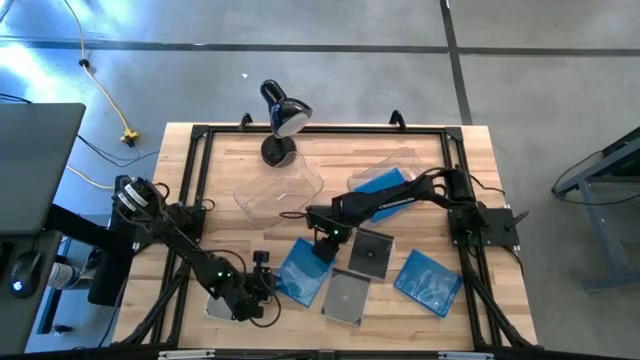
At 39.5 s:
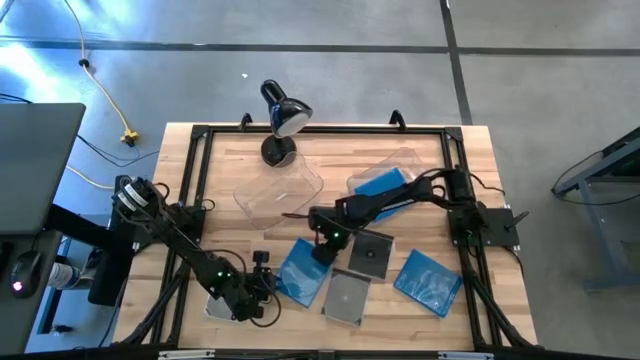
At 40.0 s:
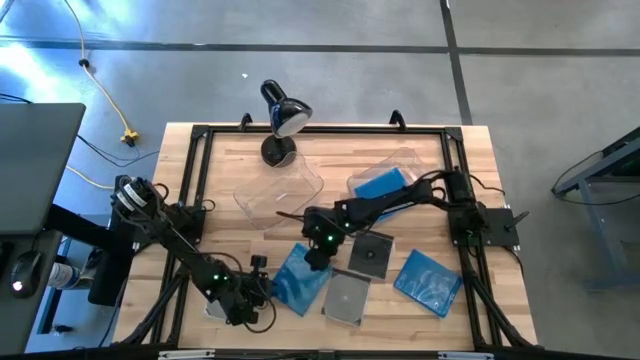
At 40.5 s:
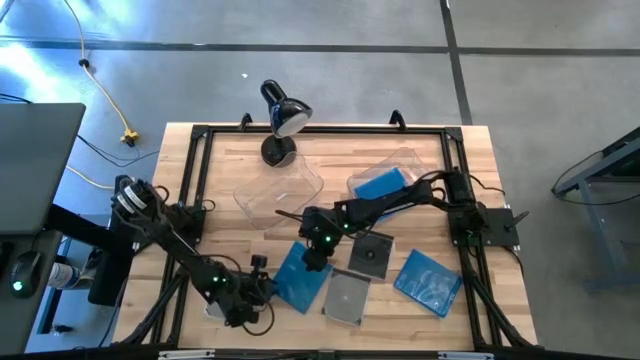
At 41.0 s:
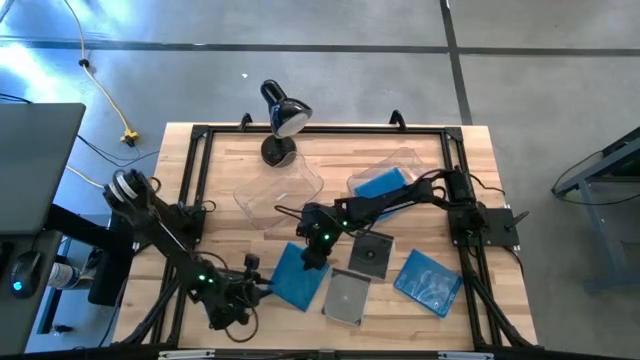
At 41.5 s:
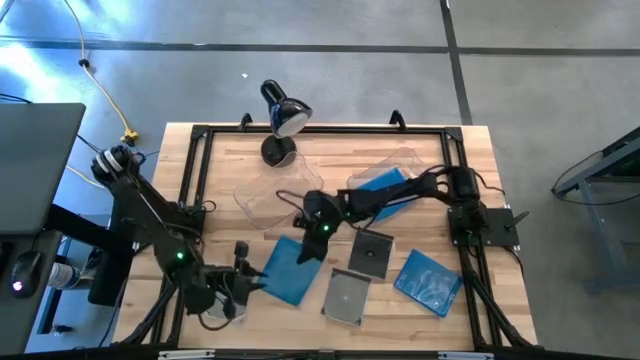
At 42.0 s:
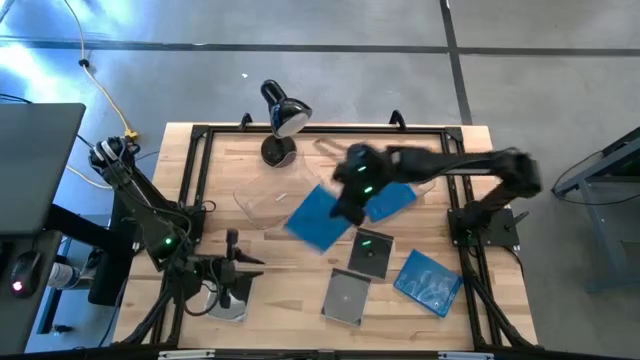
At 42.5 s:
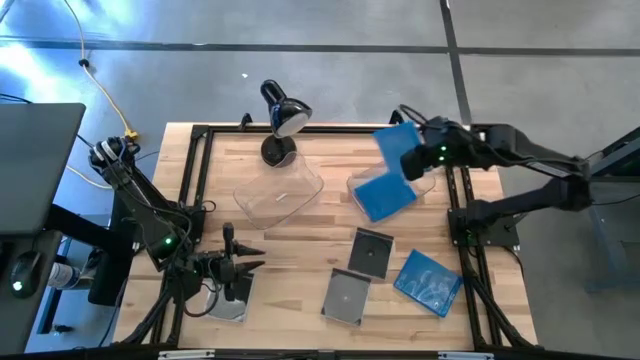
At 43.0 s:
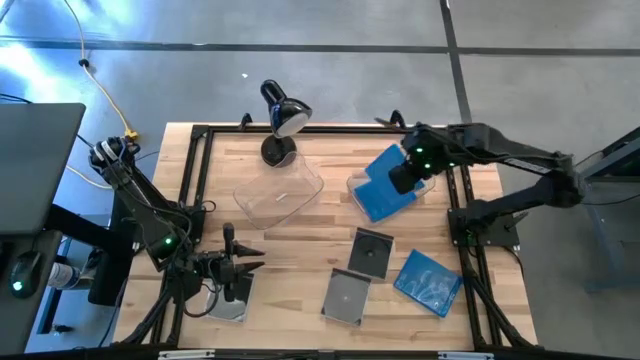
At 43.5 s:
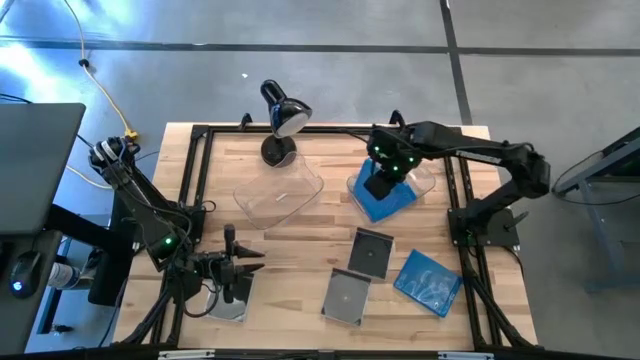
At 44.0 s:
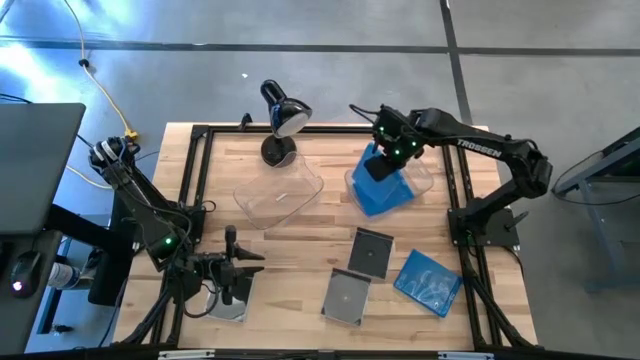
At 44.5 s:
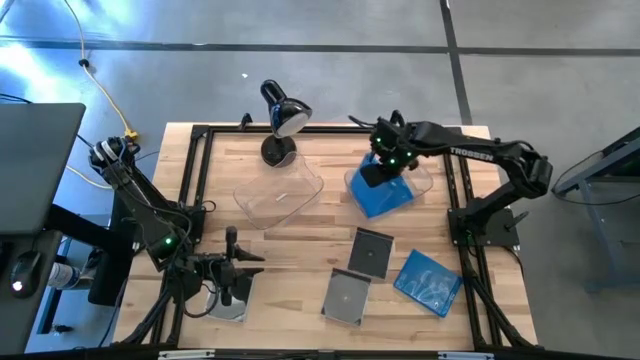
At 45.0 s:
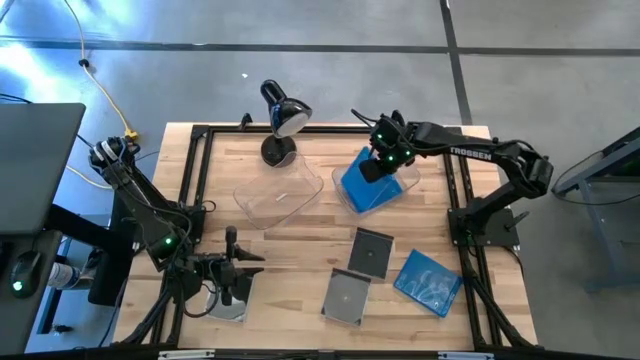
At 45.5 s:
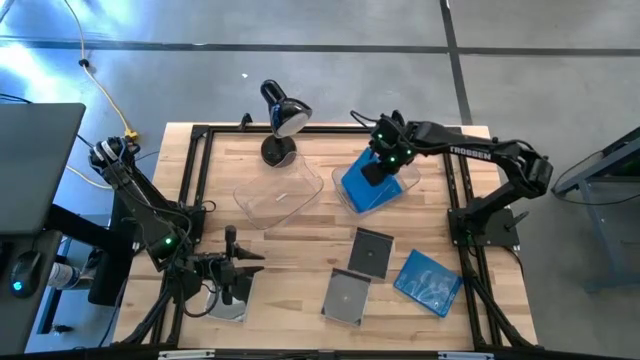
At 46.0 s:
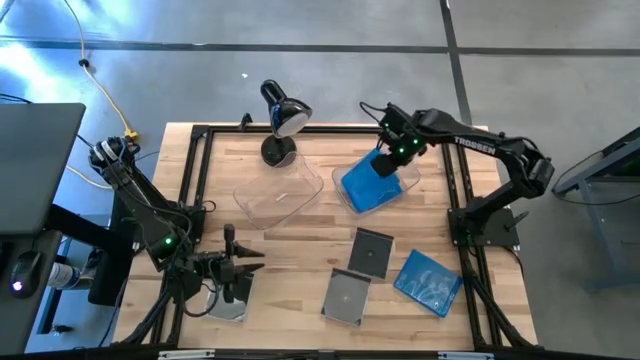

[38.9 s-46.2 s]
Task: Pick & place jewel cases by type
Put the top blue CD case into the right transparent bin

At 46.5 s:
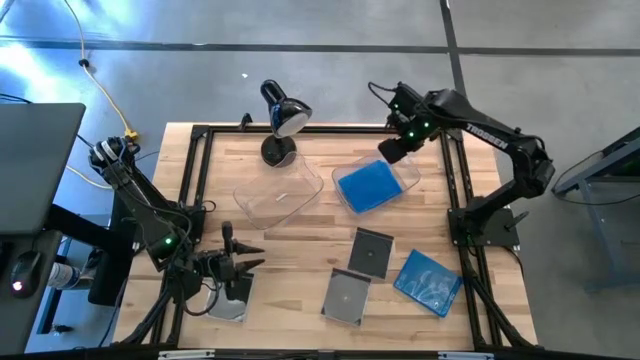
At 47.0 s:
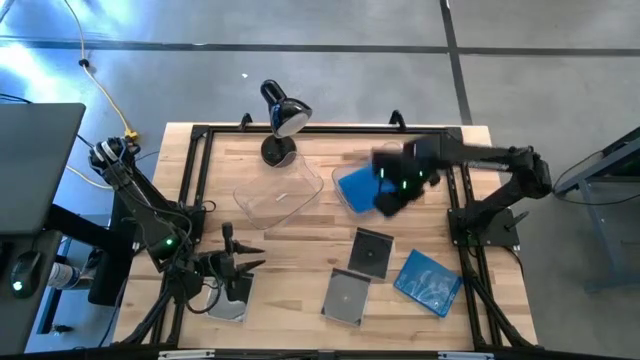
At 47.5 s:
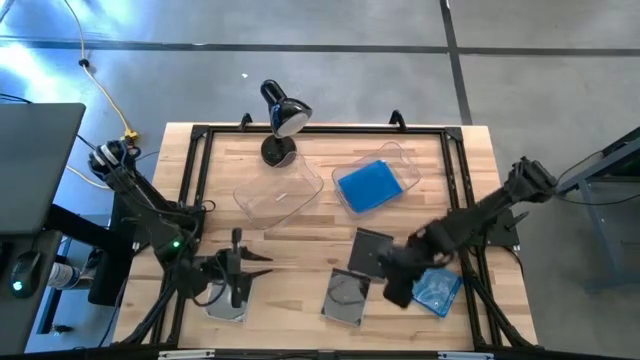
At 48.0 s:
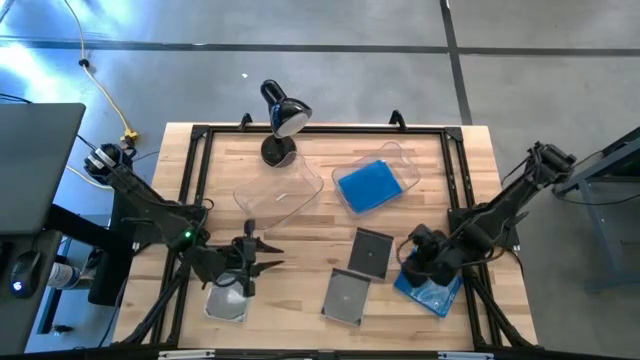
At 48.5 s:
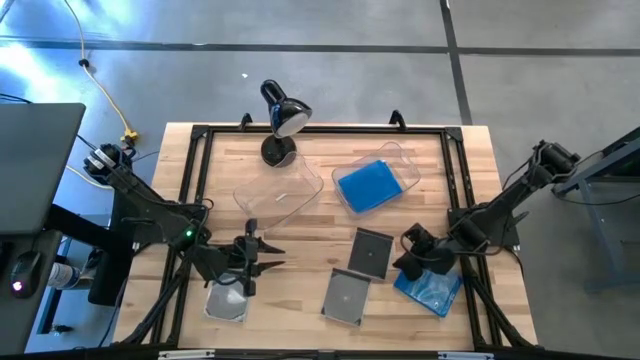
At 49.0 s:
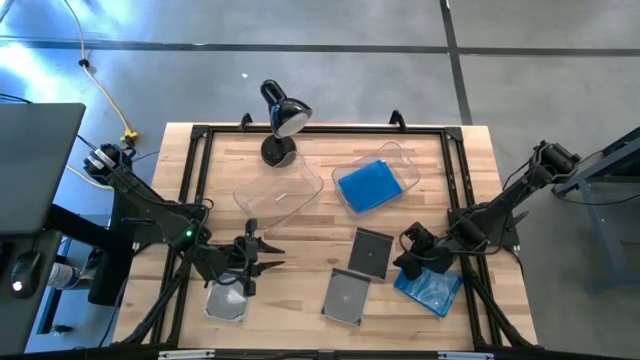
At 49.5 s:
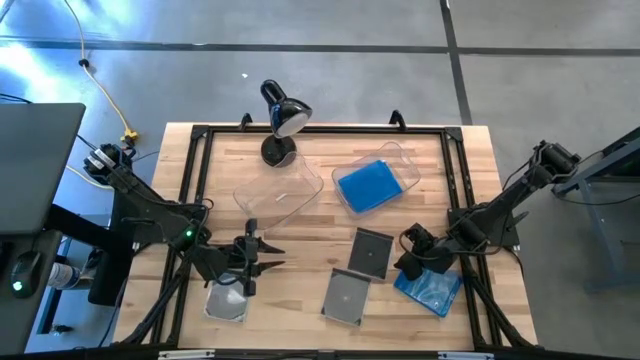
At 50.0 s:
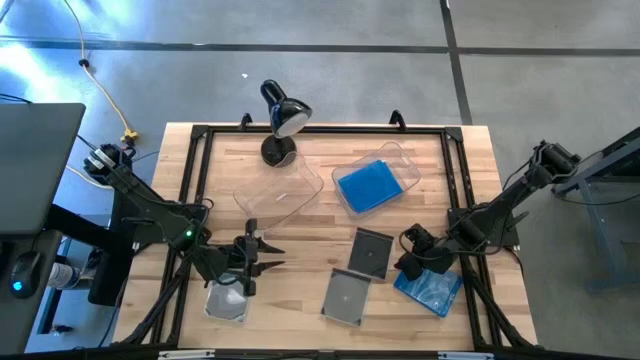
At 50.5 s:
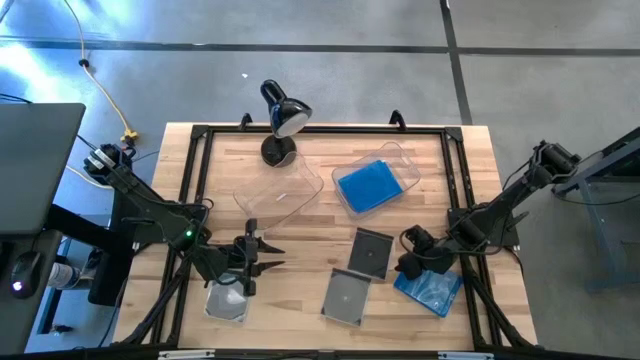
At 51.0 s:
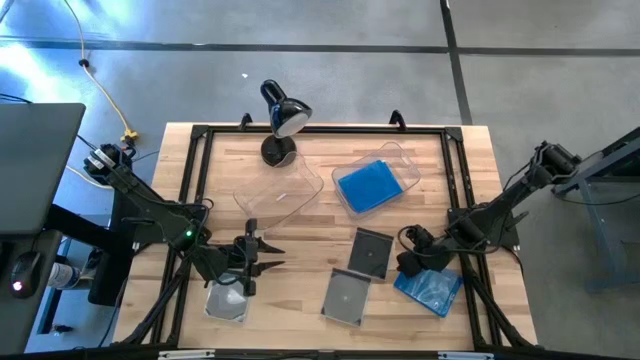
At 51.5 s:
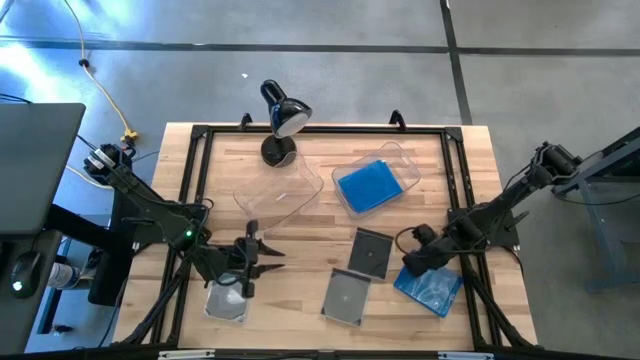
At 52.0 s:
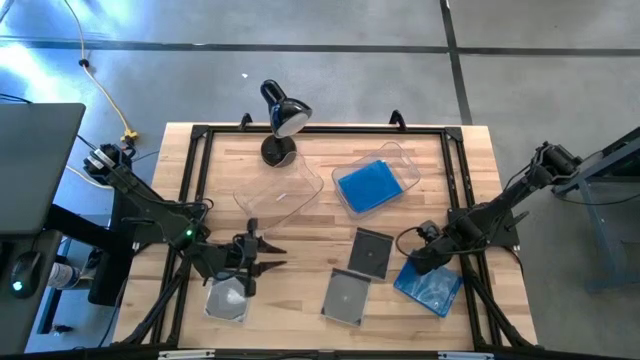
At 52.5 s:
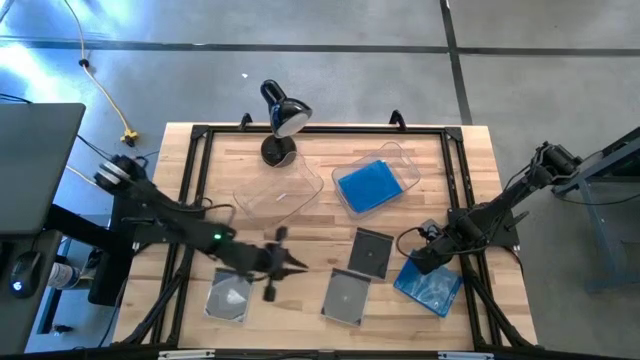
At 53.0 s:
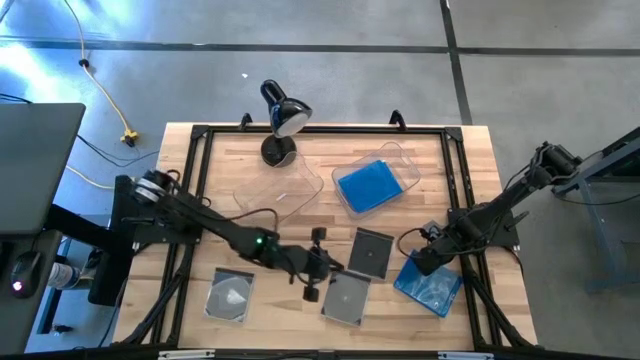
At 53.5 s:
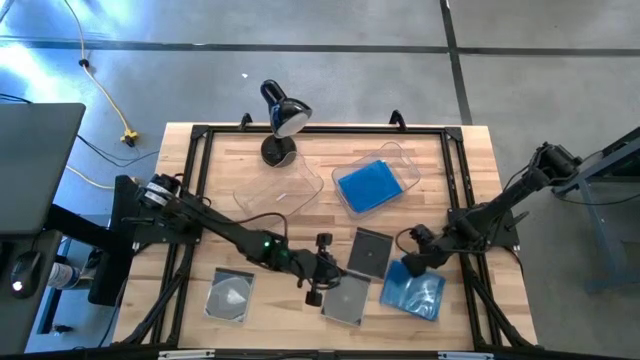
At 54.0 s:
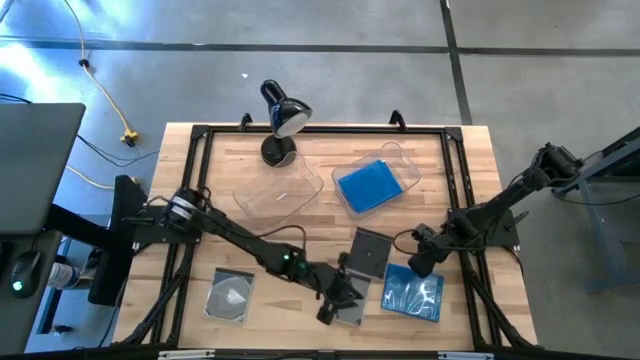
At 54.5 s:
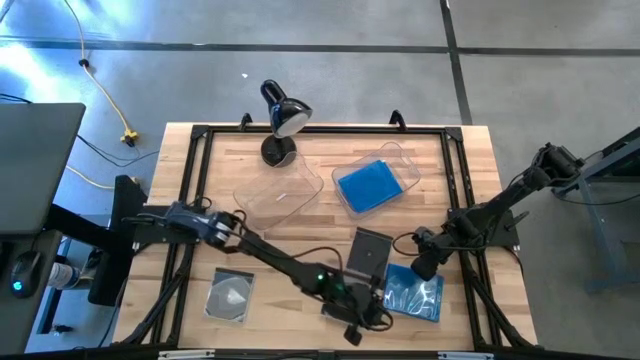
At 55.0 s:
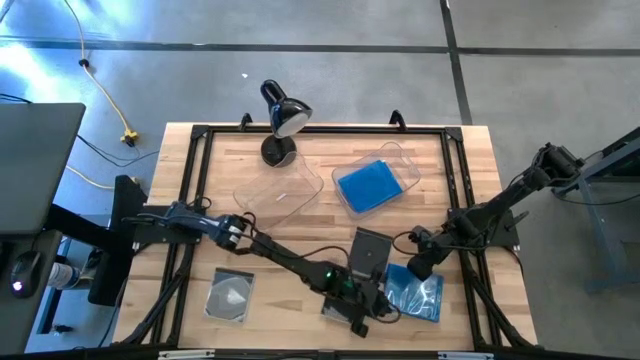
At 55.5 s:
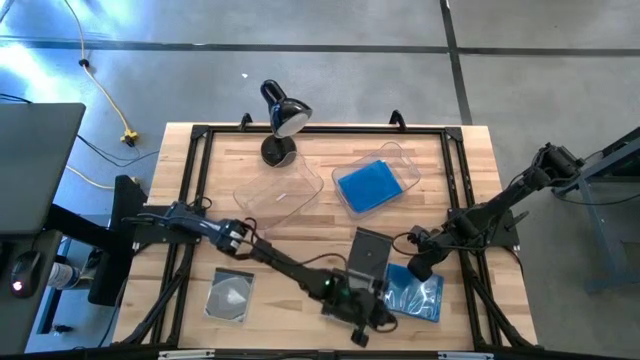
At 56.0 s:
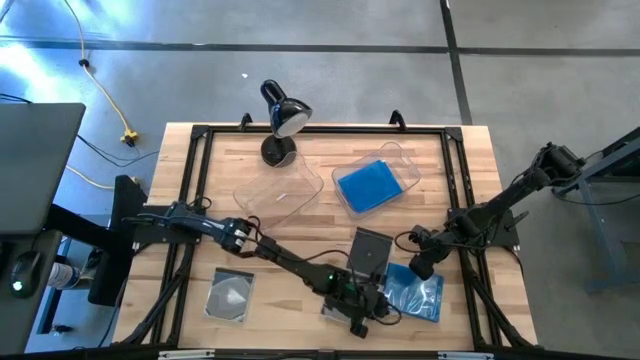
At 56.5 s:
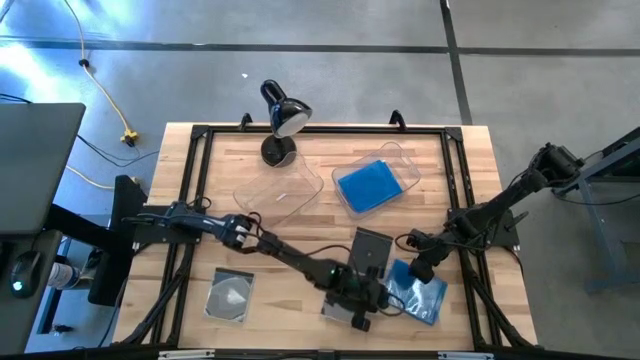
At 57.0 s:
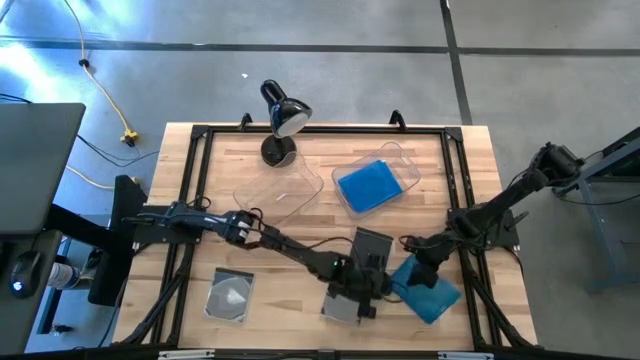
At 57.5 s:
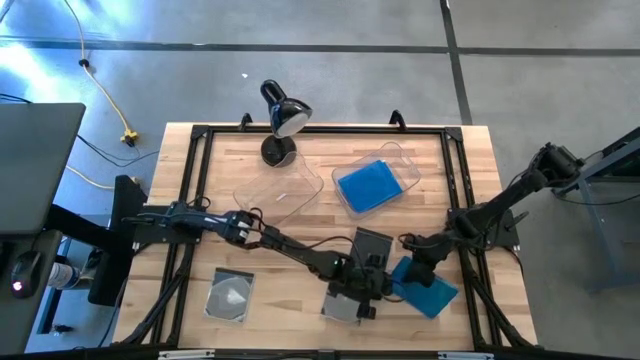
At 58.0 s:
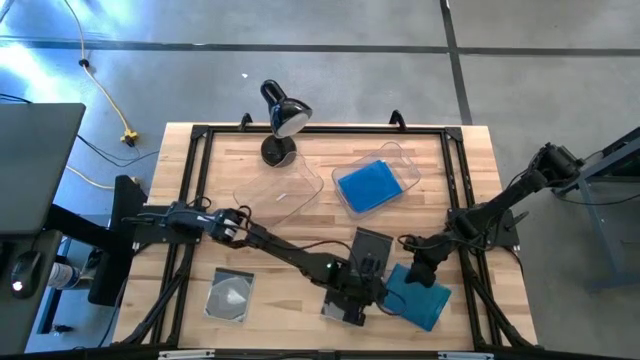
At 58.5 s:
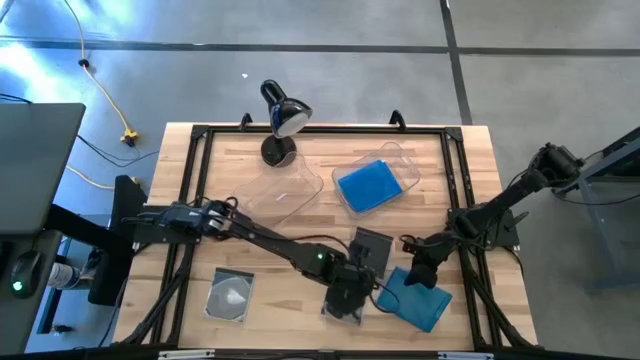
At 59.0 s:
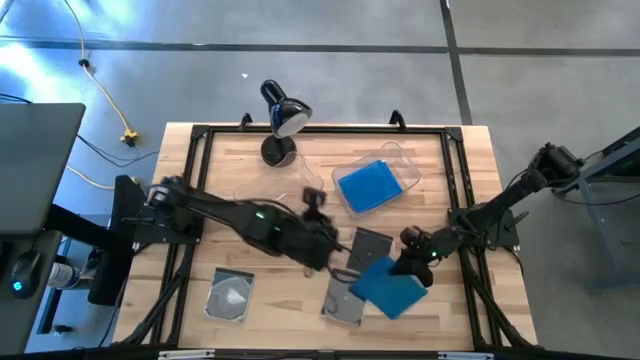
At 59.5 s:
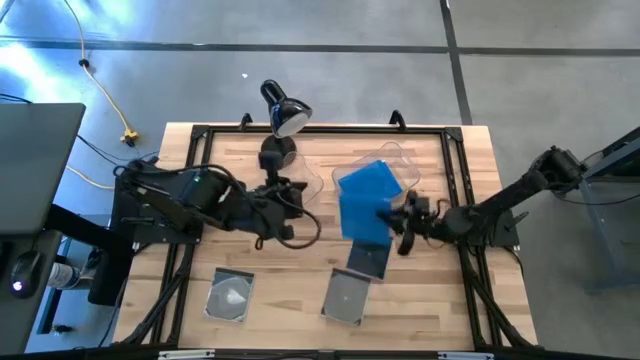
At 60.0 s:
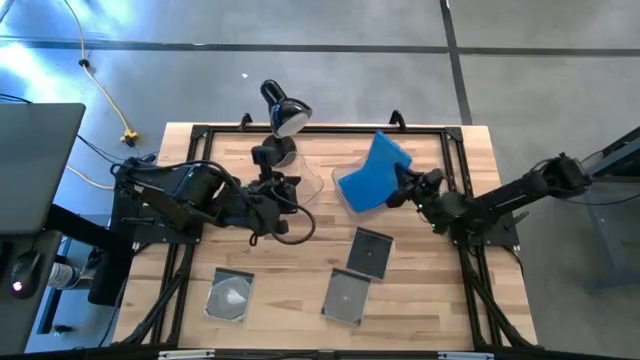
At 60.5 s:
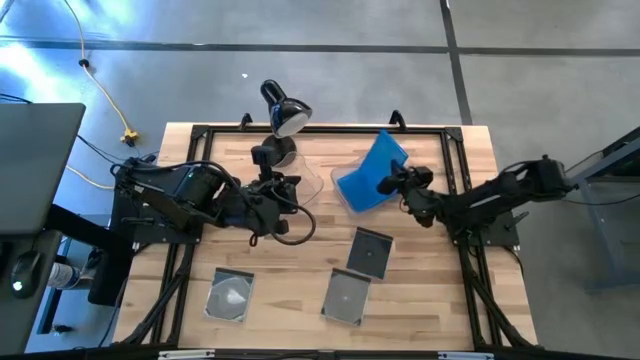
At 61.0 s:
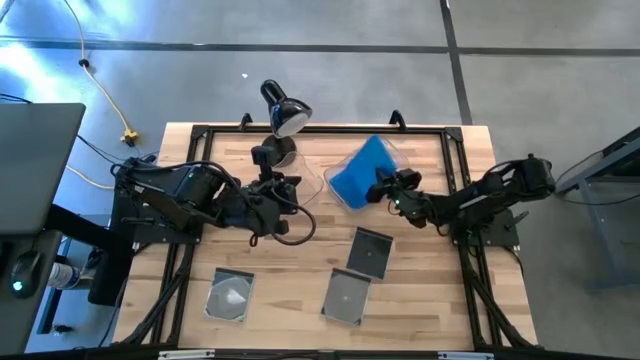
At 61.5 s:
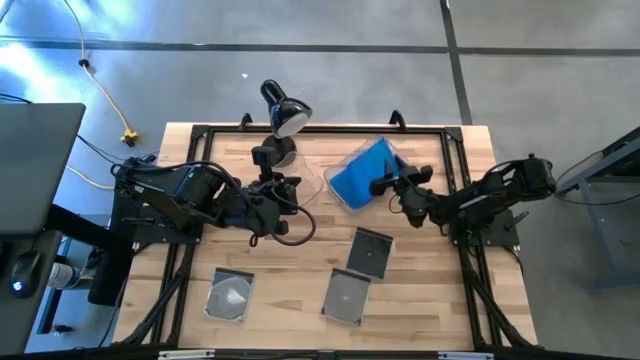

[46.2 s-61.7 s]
Put the blue CD case into the right transparent bin
